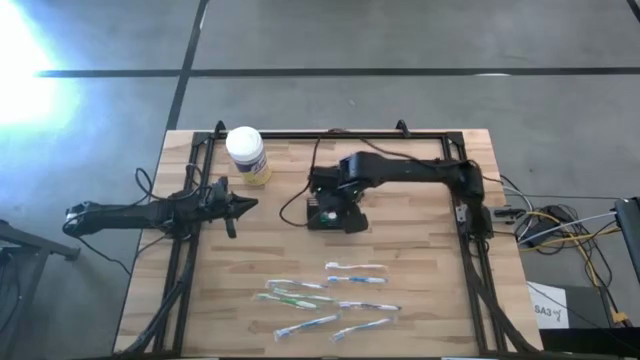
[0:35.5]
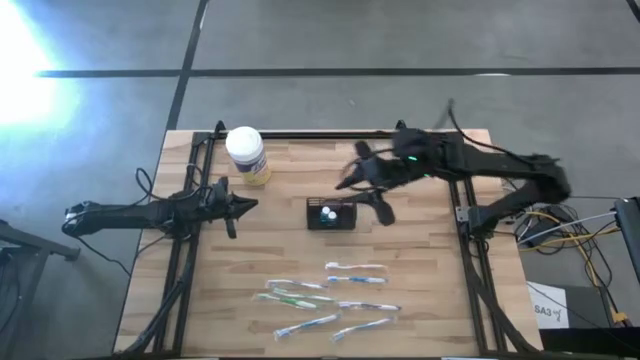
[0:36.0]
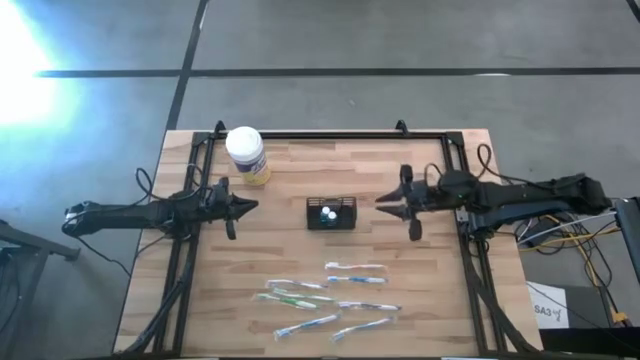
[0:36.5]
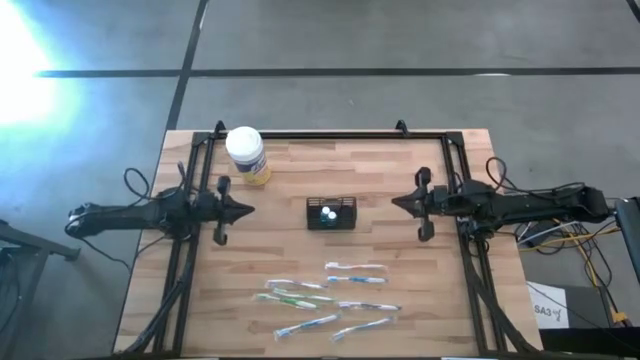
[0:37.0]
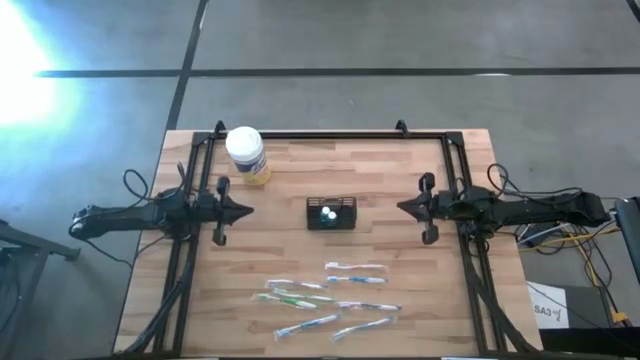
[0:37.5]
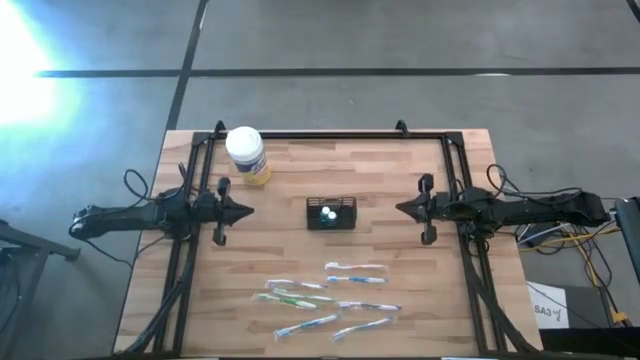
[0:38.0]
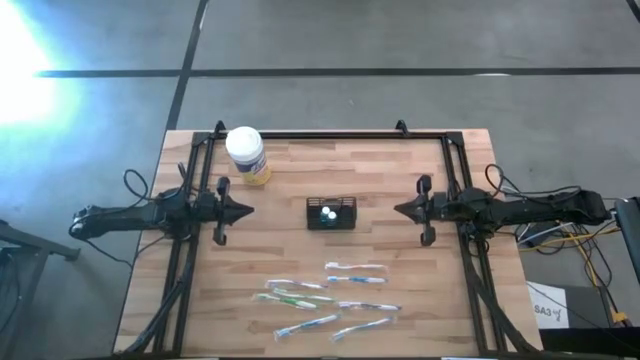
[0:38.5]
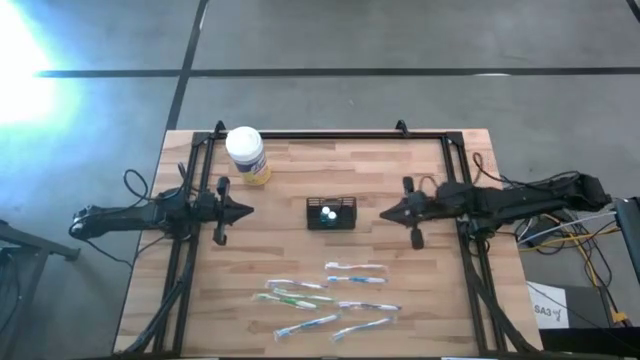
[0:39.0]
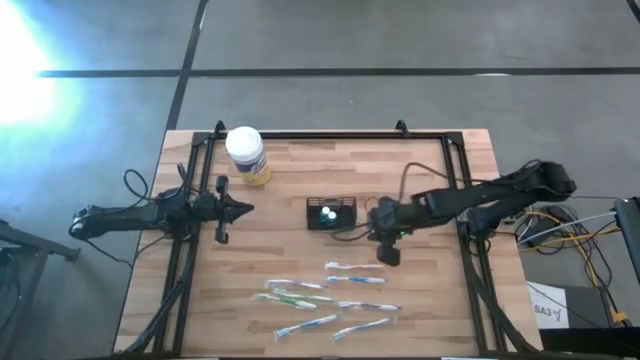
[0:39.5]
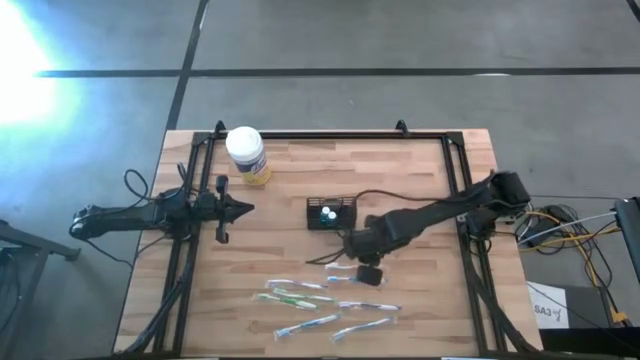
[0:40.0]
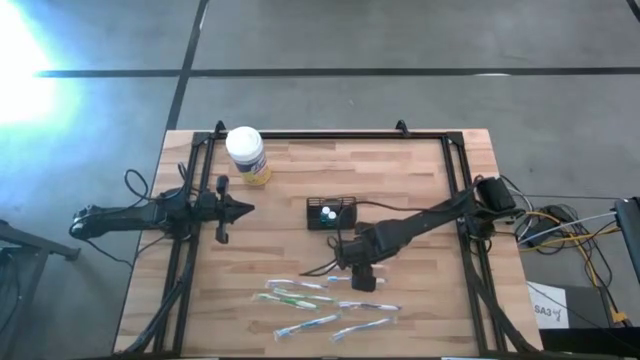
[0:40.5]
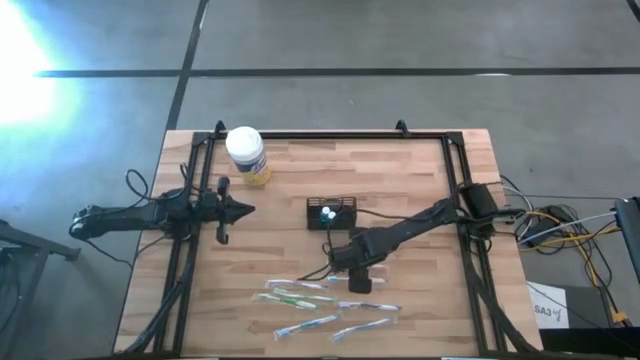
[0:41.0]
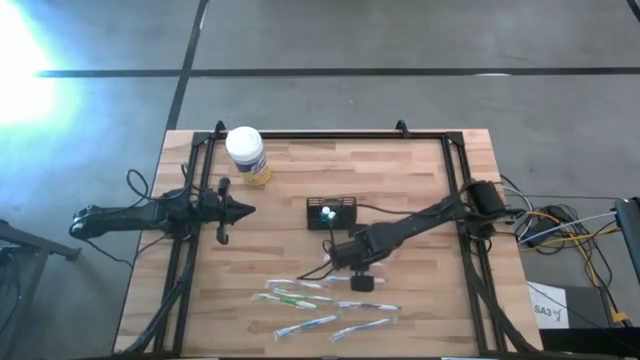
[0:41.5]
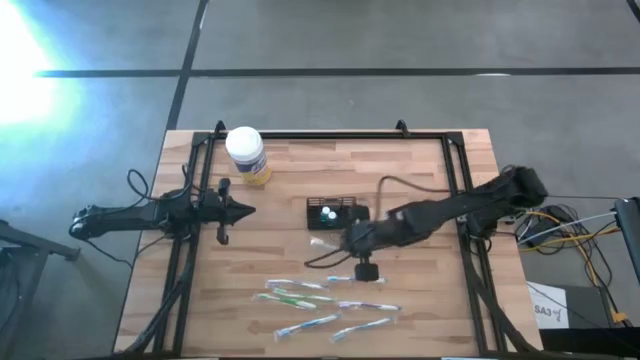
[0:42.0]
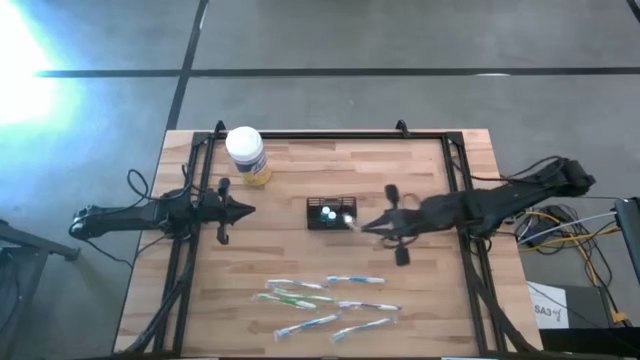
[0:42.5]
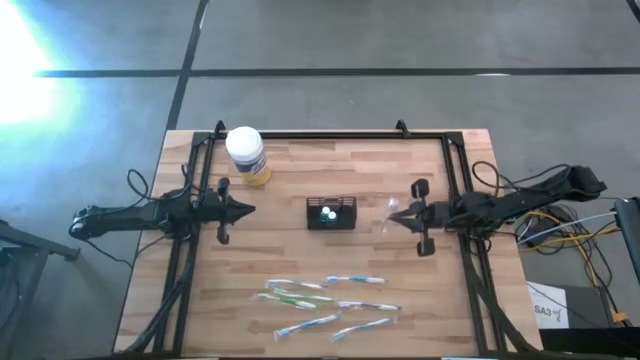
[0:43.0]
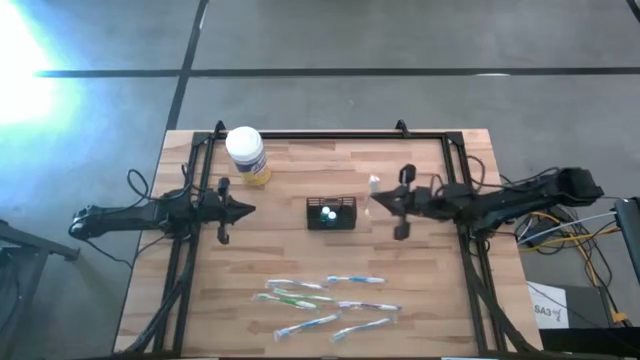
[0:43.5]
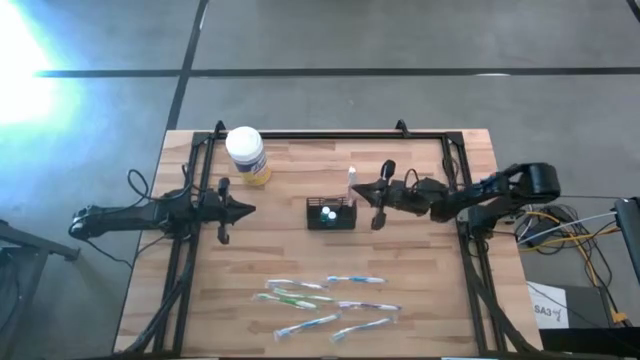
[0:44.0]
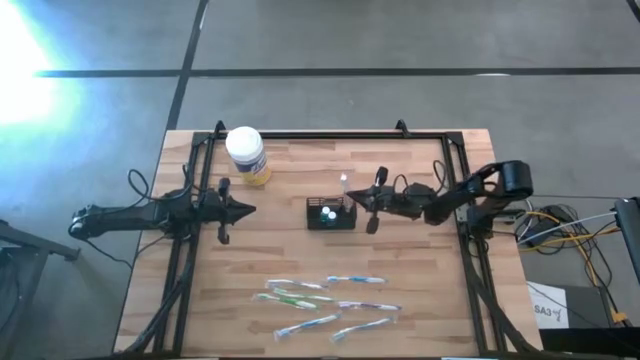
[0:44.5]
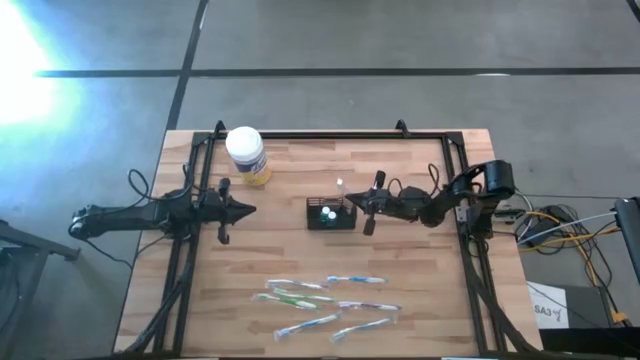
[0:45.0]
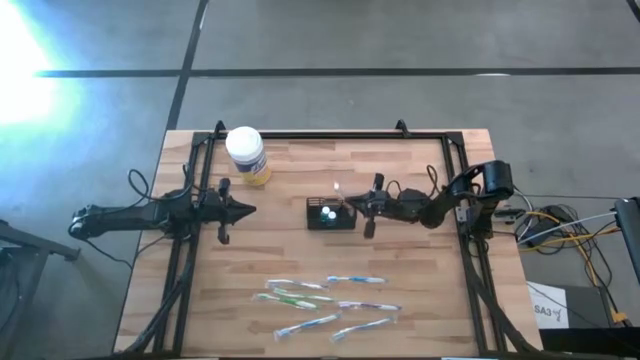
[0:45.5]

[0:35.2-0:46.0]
Task: Pick & Place toothbrushing station
Put the orange toothbrush into the black wire organizer

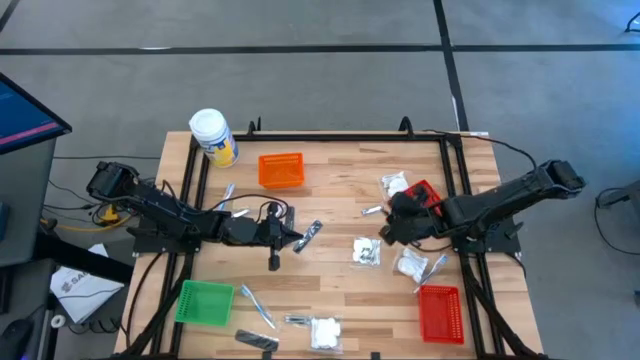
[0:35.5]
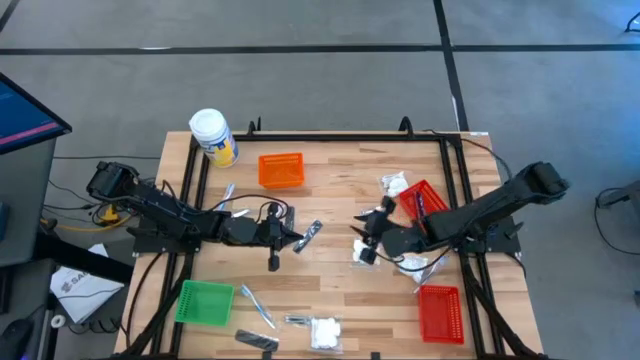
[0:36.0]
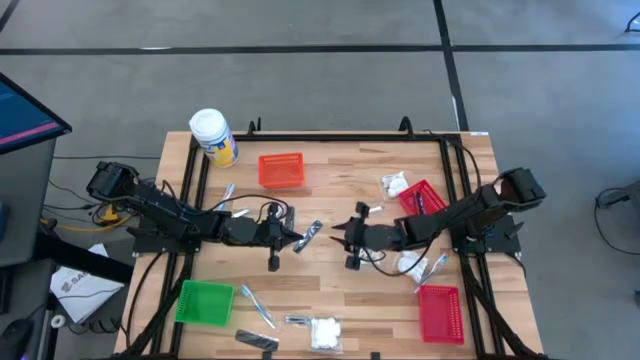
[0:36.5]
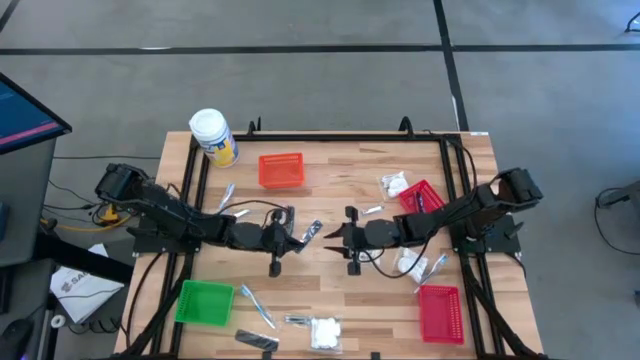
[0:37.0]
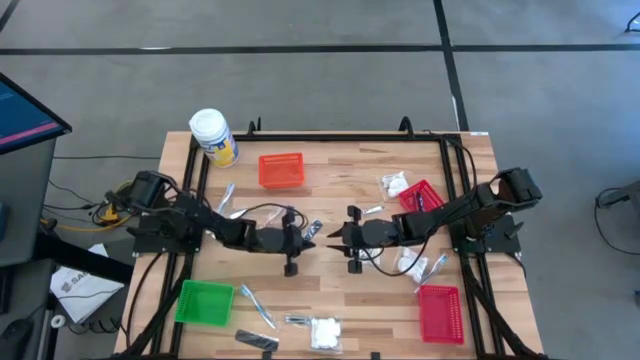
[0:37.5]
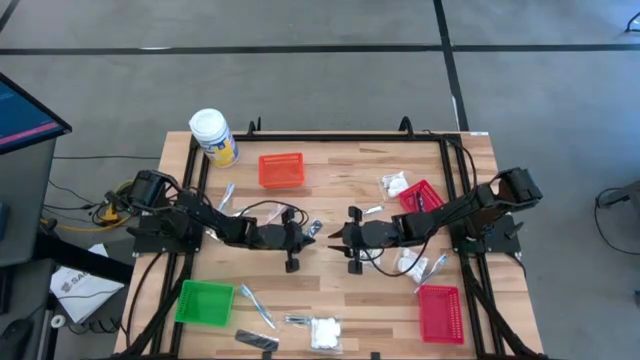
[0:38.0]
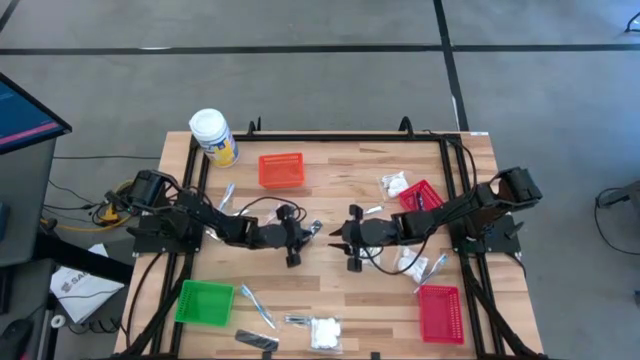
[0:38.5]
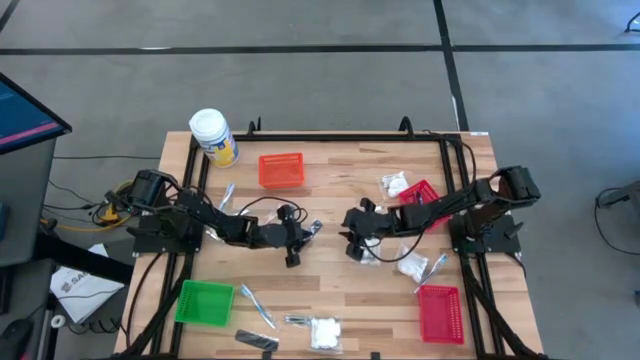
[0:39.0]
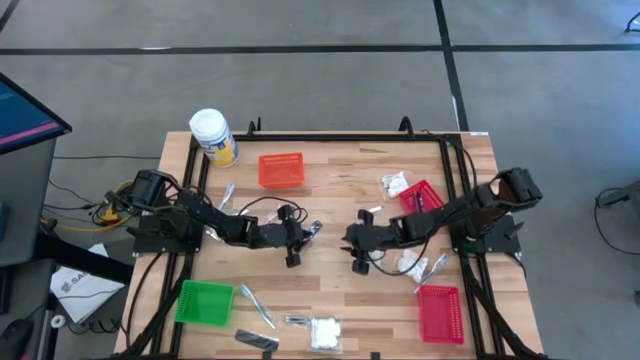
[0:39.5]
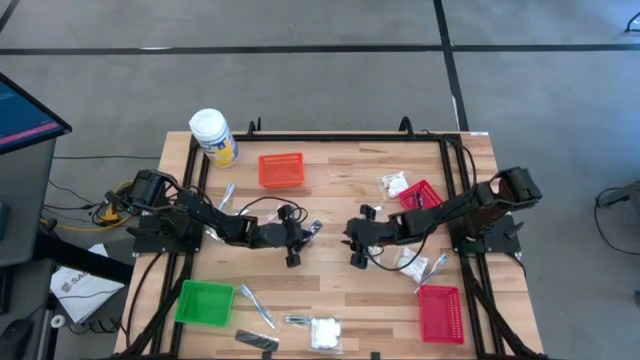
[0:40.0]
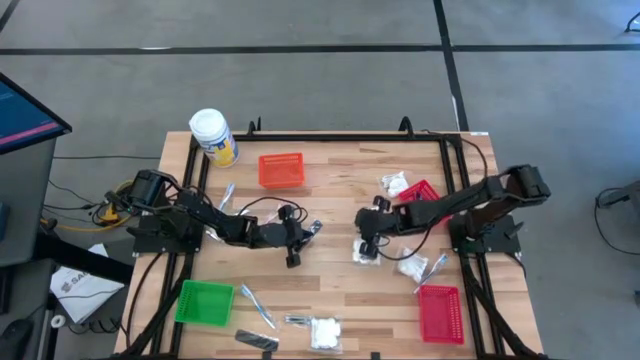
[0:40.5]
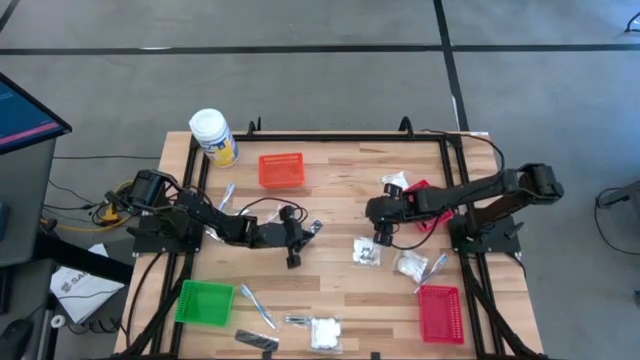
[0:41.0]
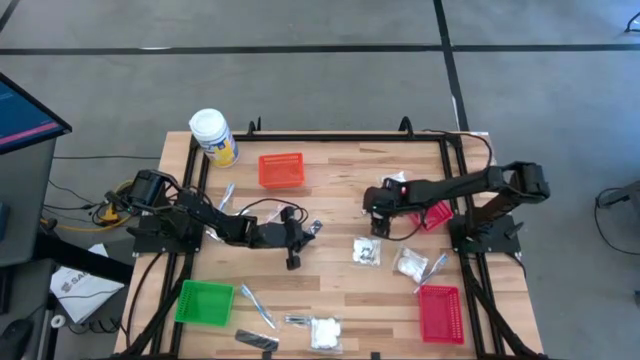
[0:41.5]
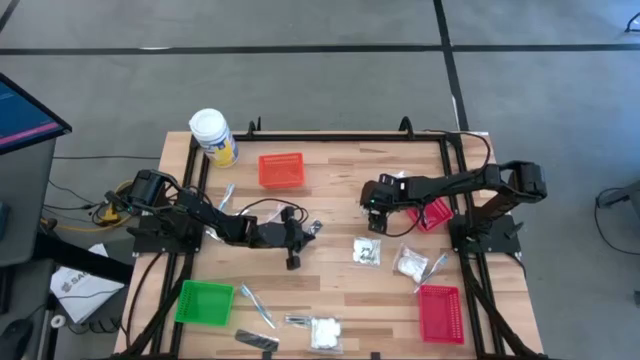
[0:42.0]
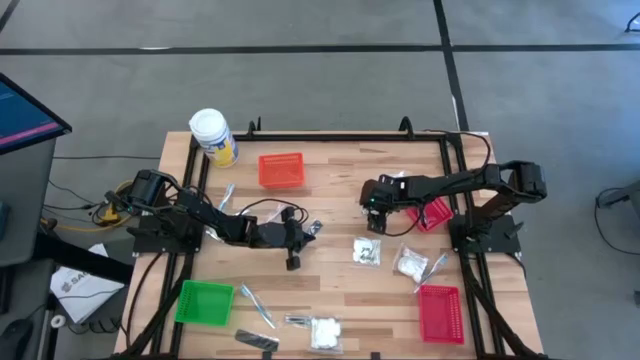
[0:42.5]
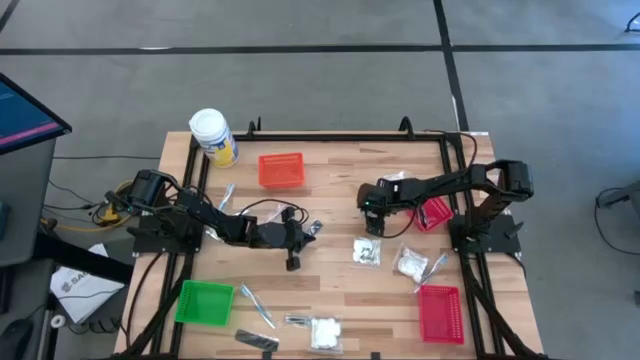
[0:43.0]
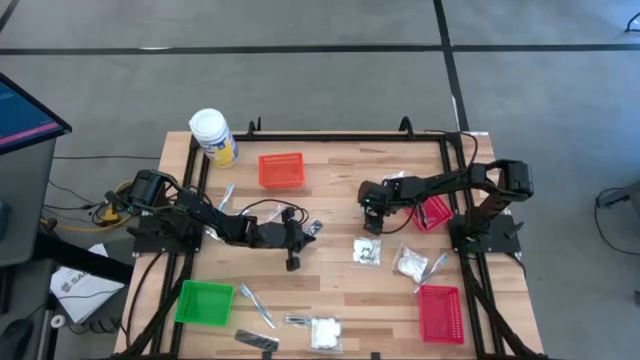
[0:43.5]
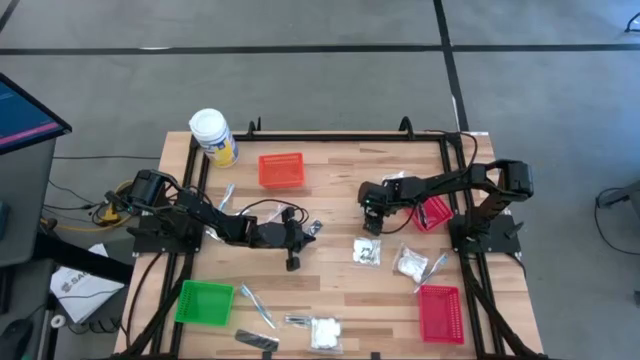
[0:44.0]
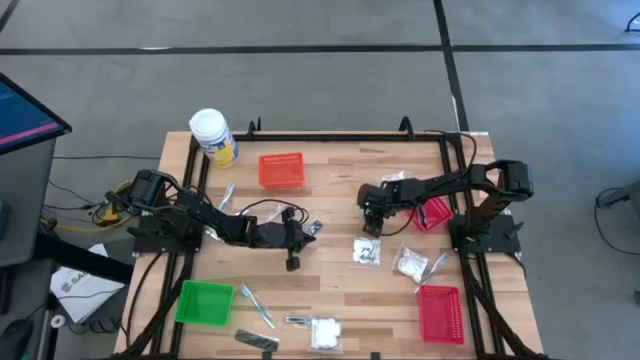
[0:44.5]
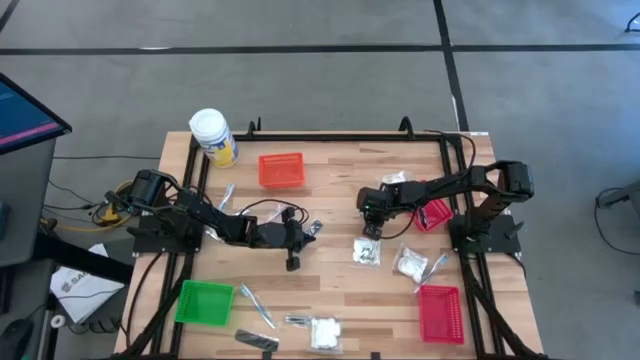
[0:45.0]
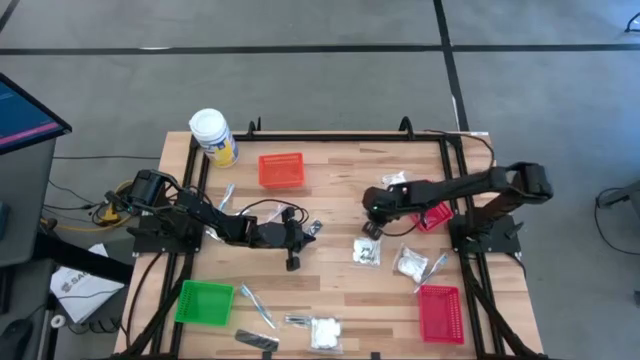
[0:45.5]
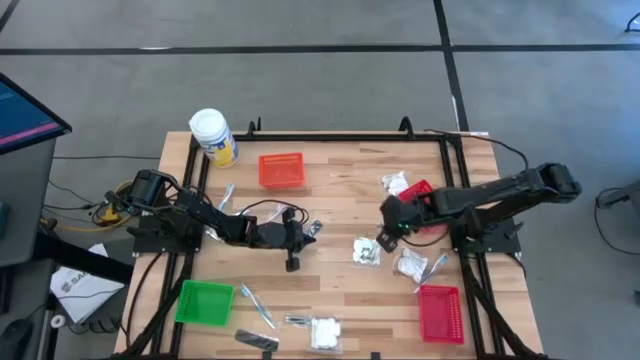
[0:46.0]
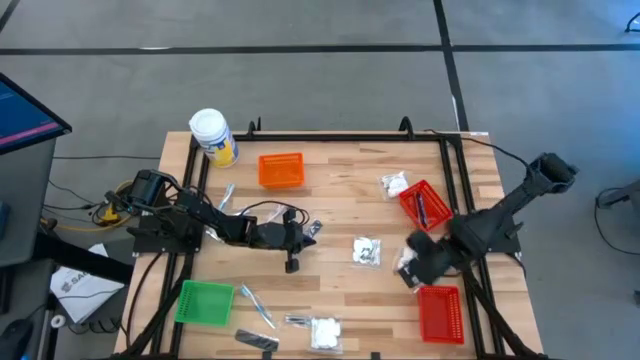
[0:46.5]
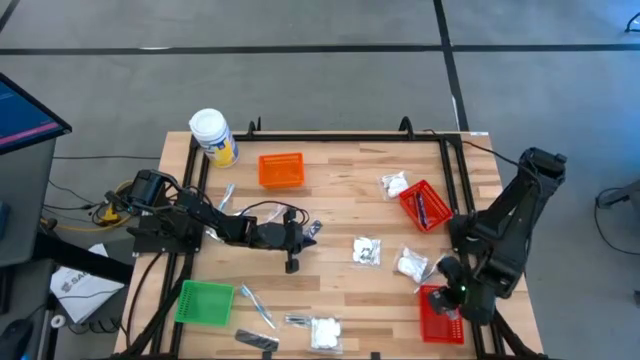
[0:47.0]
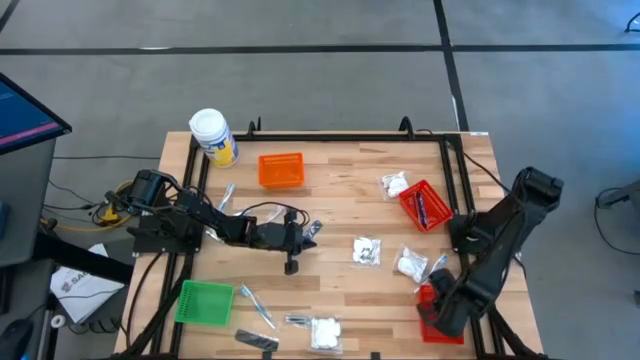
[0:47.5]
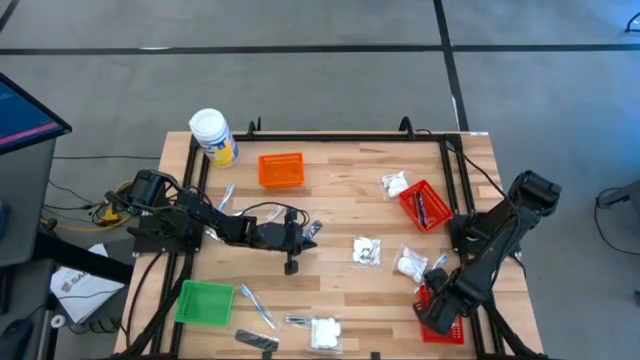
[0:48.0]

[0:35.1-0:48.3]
Task: Pick & Place Travel size toiletries
Put the silver nail cutter into the bottom red basket
